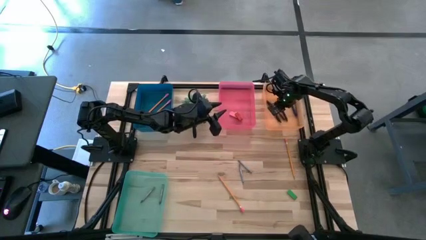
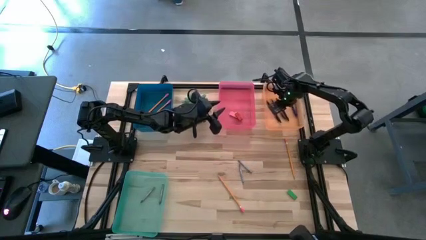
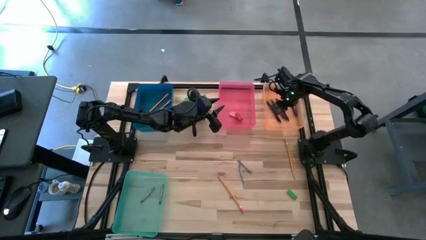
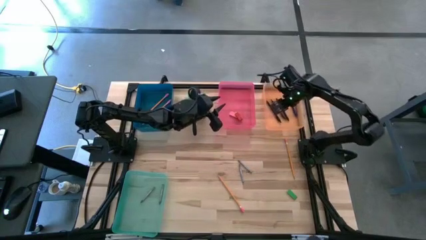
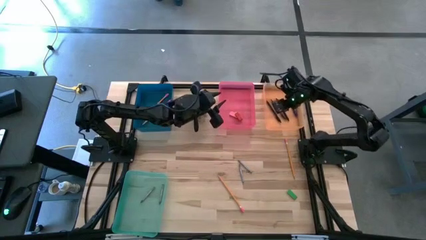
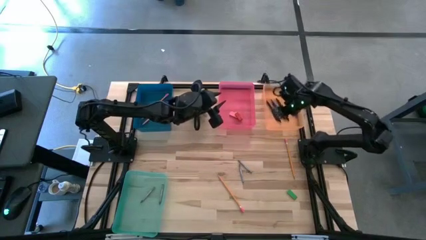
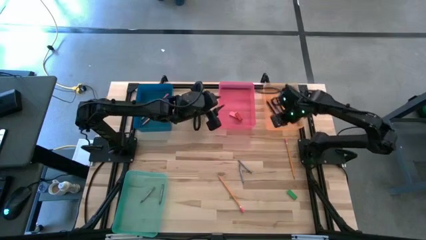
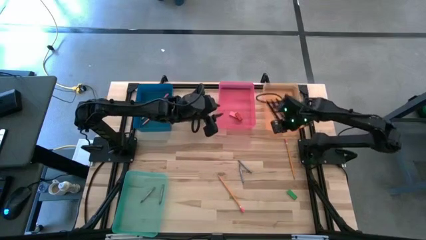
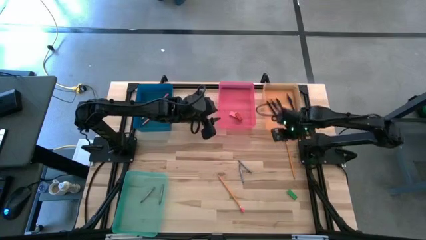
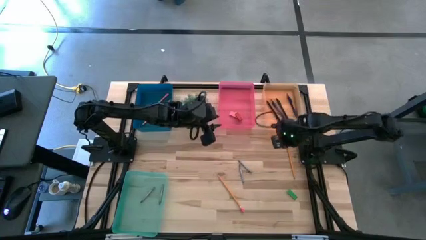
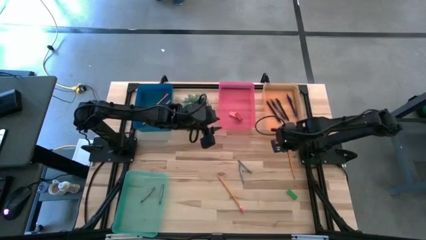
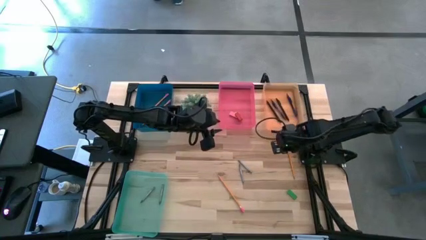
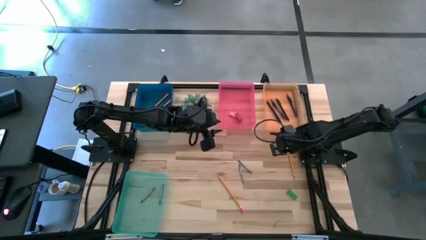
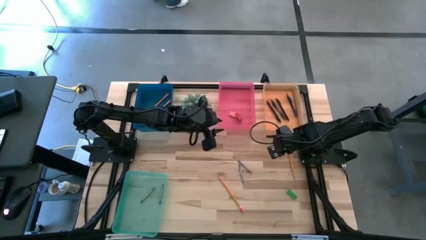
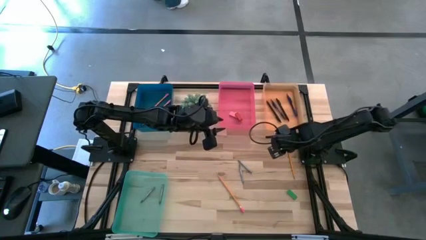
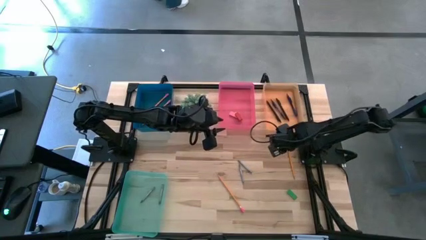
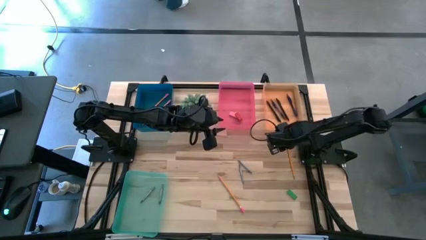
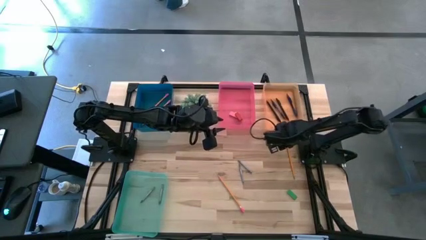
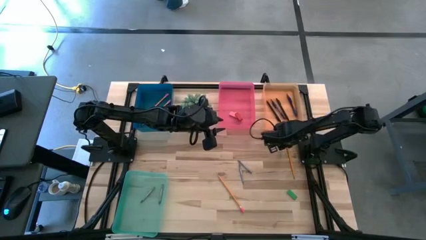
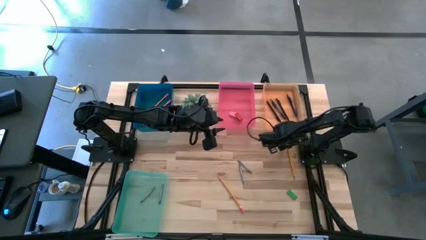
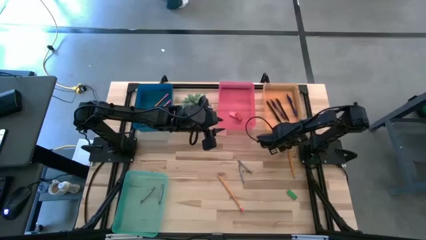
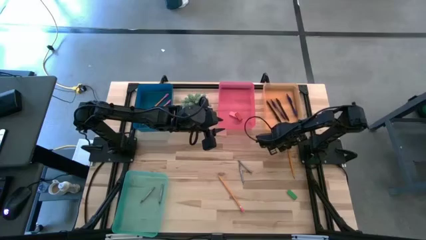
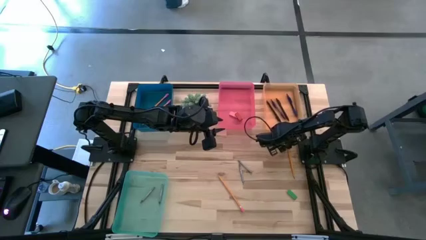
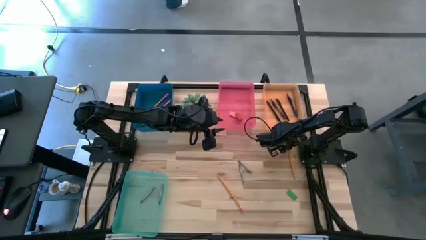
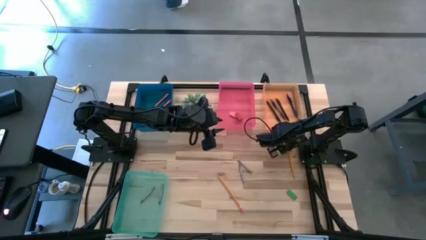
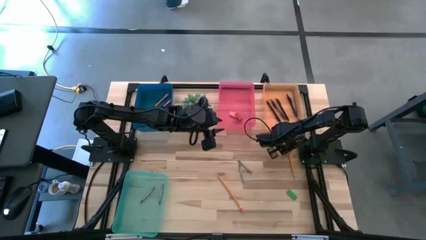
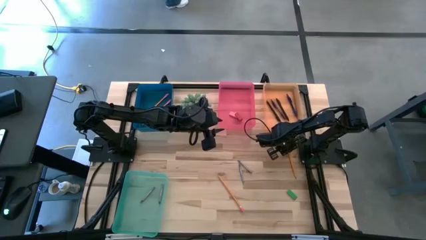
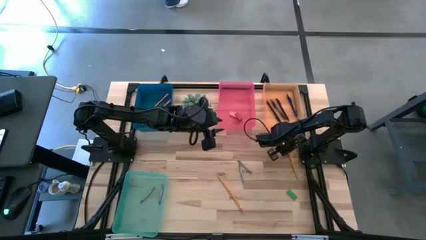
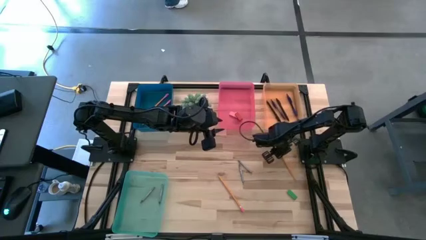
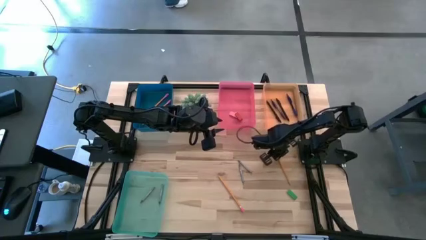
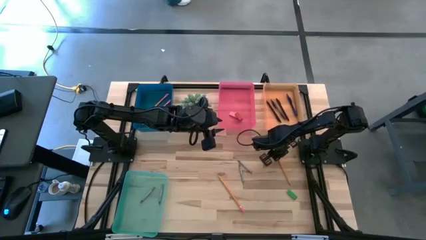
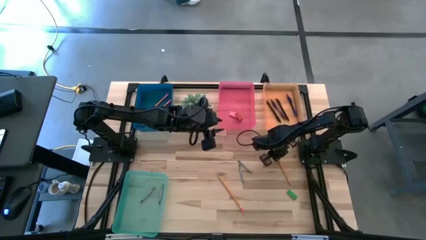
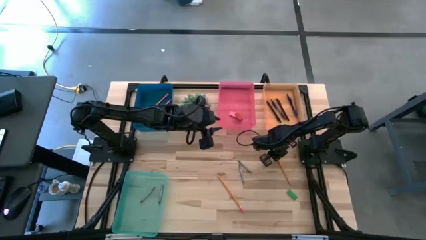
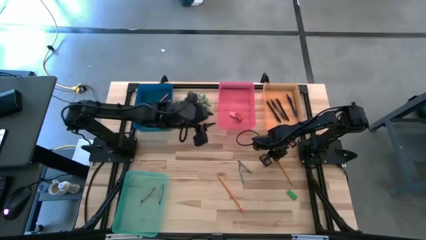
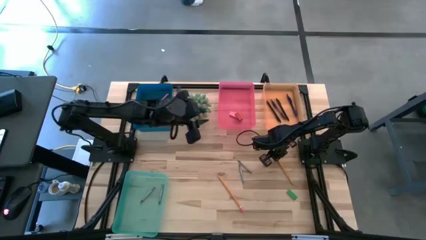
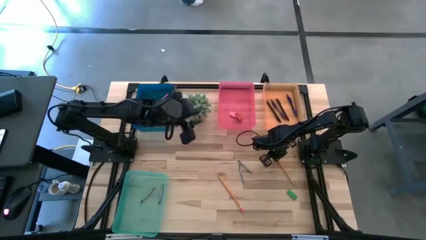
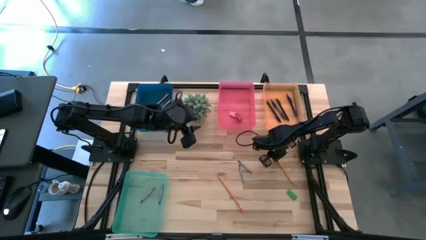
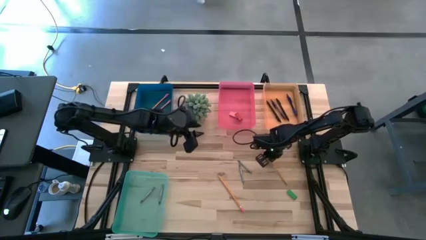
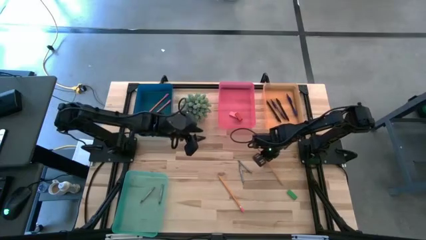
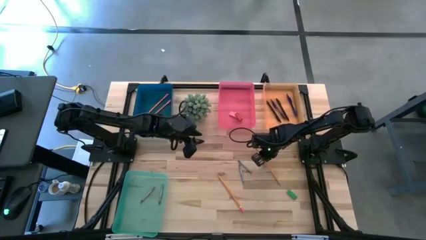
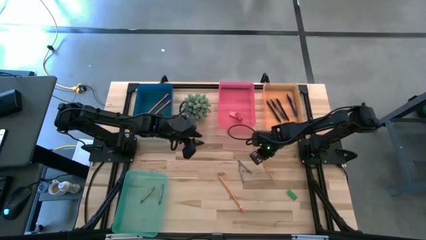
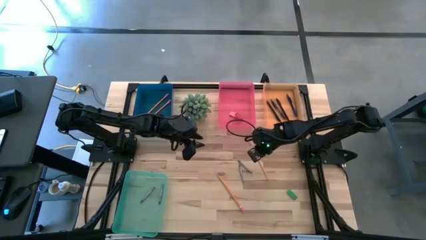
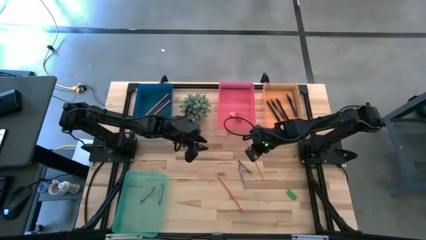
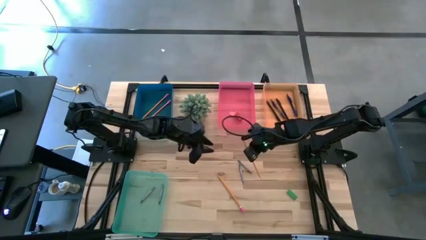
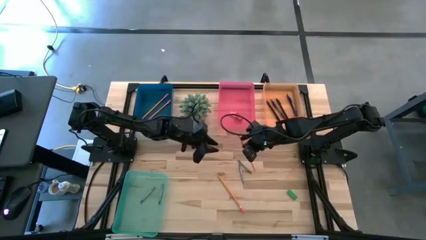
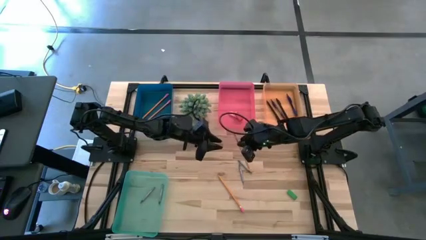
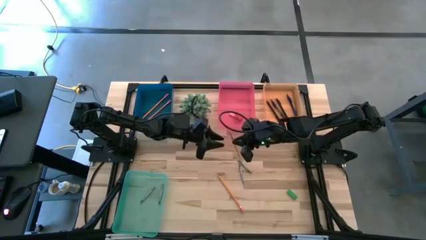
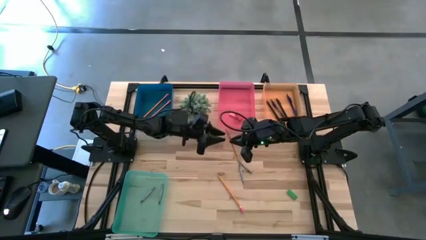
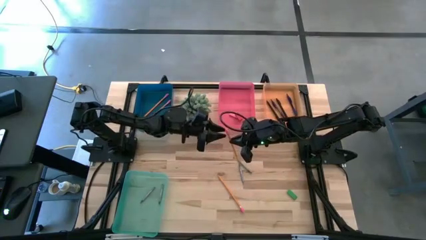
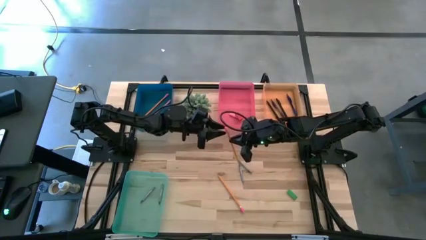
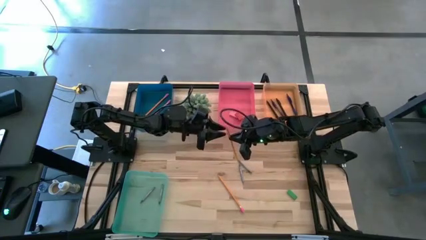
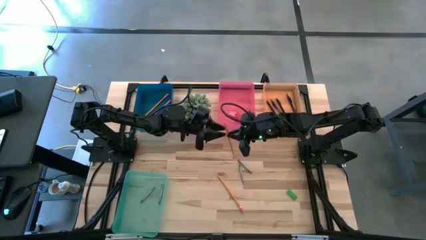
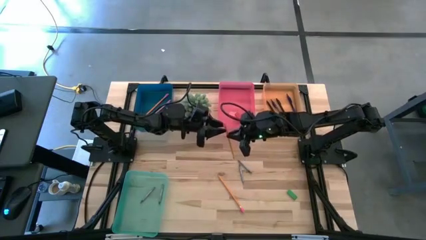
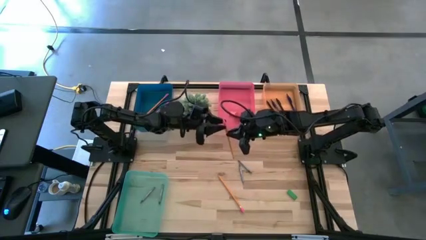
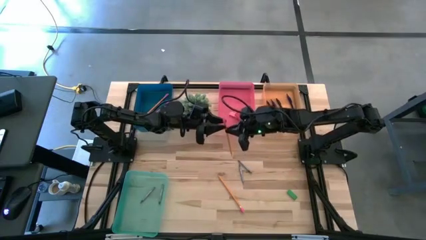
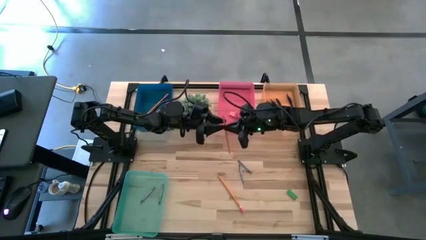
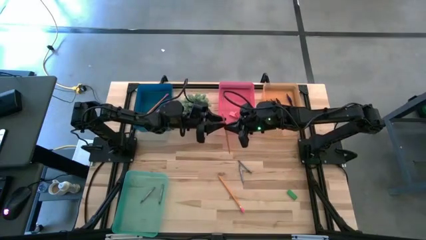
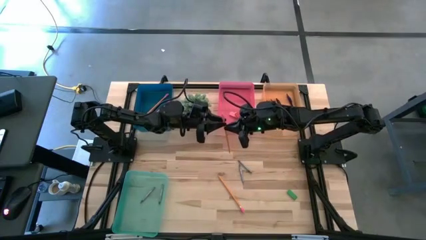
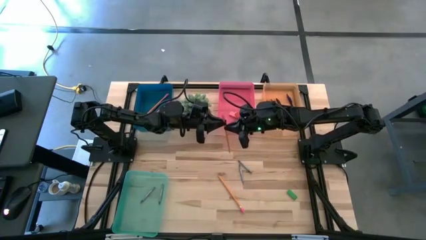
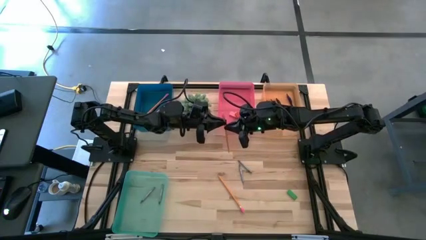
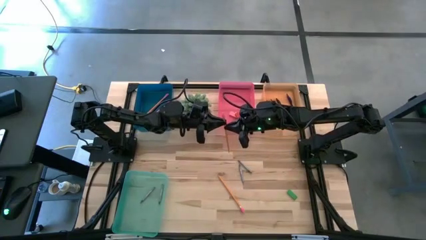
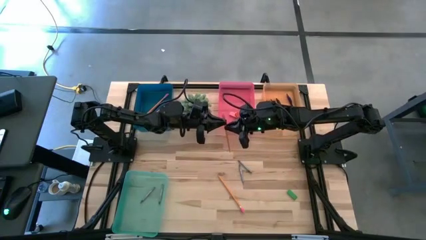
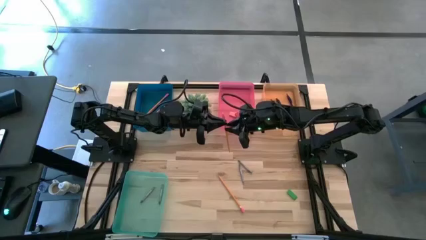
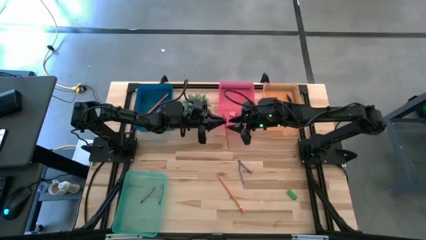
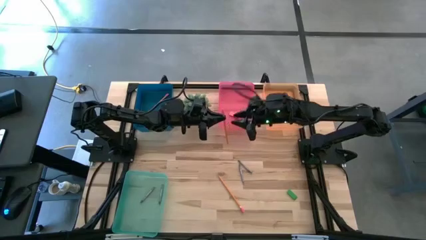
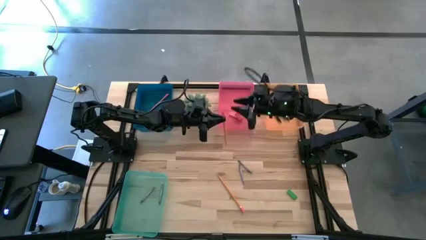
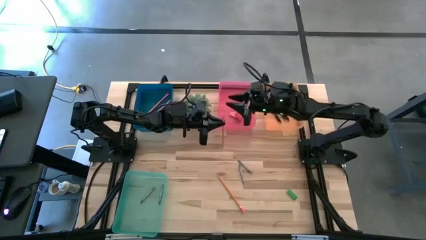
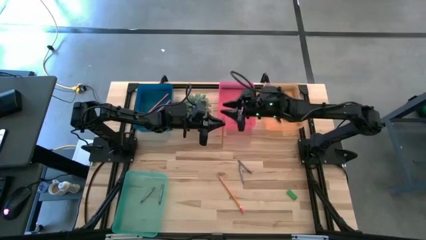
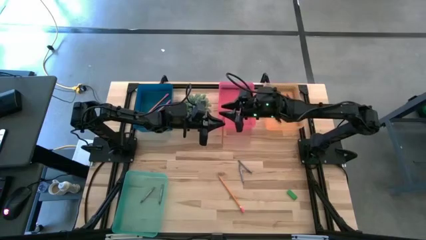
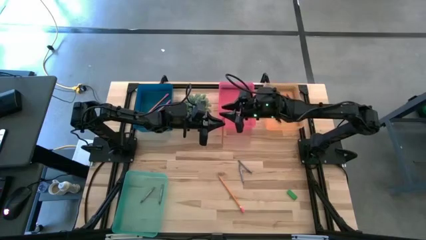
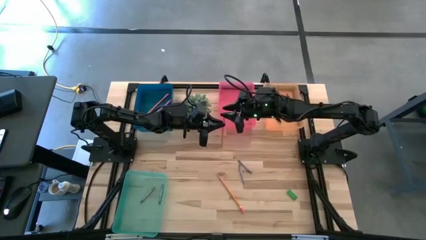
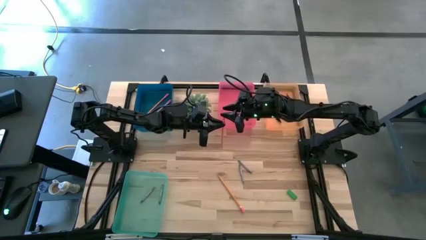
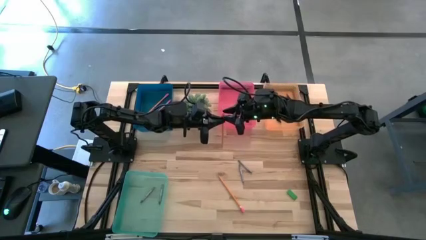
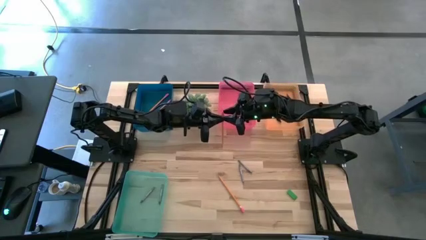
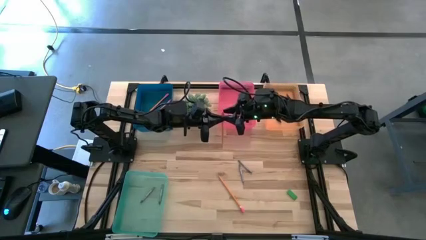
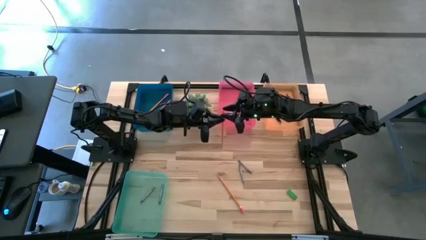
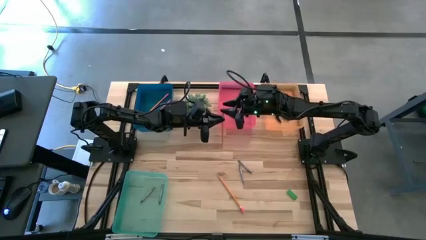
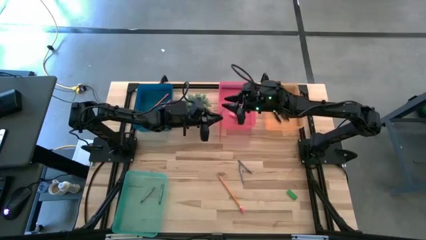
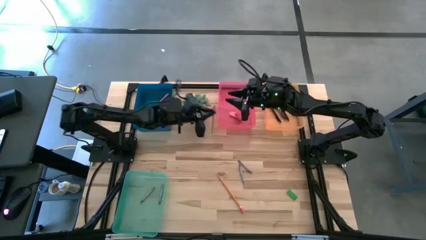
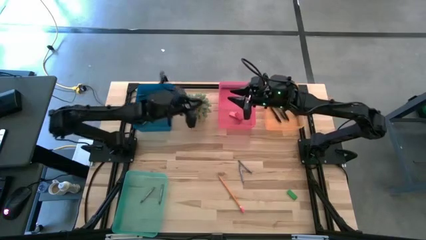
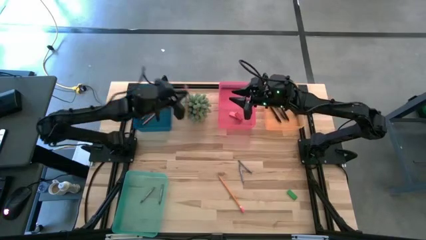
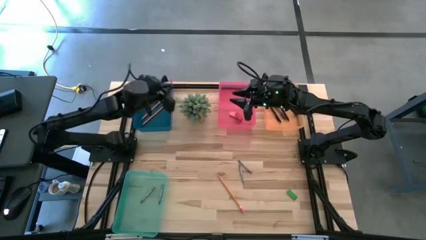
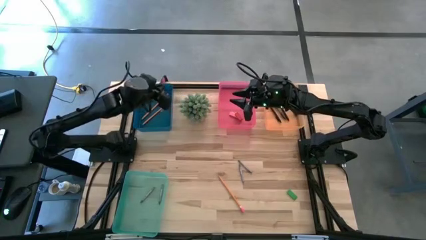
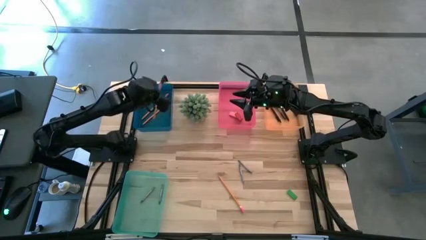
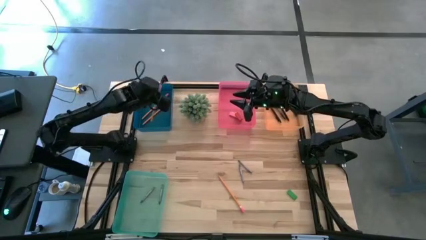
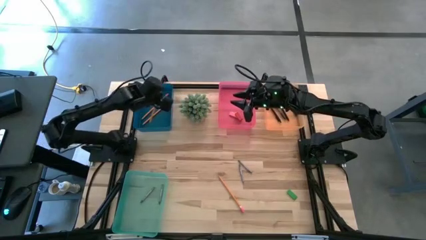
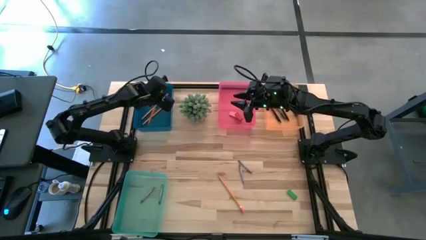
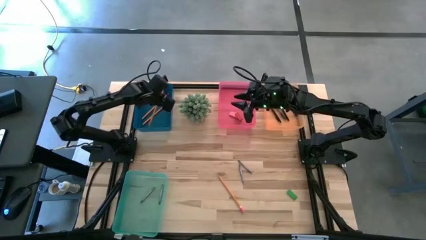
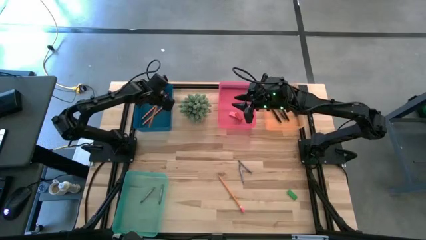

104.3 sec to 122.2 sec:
Task: Sort crayons/erasers/pens/pencils in bins
Put the orange pencil into the blue bin
